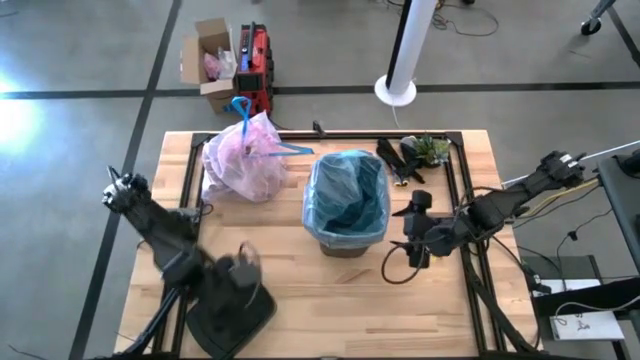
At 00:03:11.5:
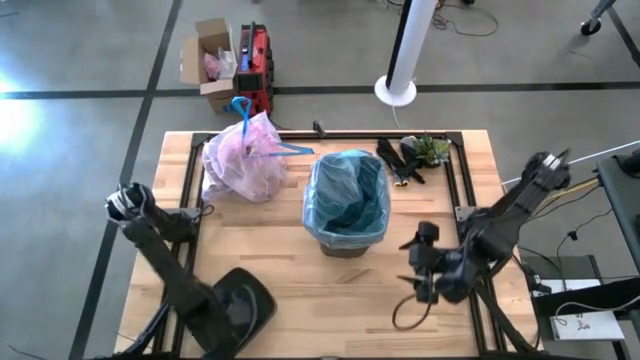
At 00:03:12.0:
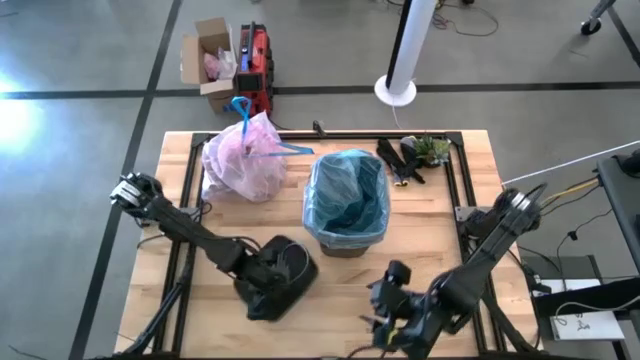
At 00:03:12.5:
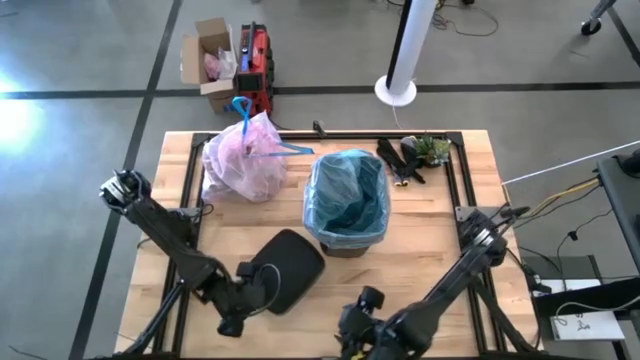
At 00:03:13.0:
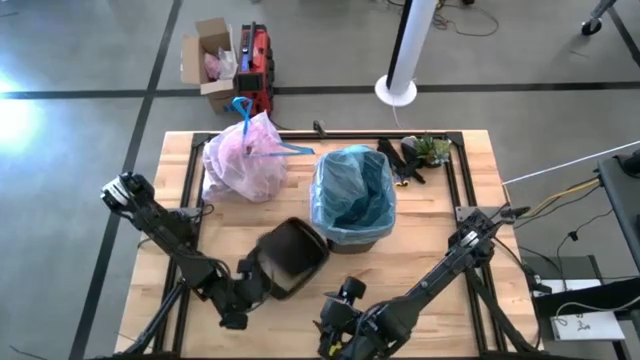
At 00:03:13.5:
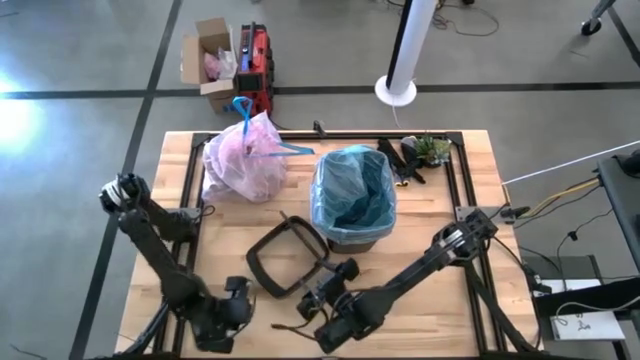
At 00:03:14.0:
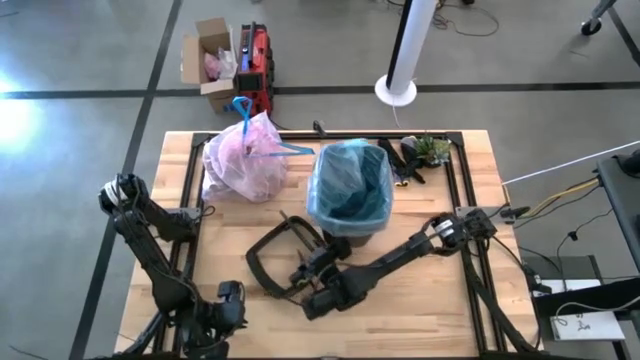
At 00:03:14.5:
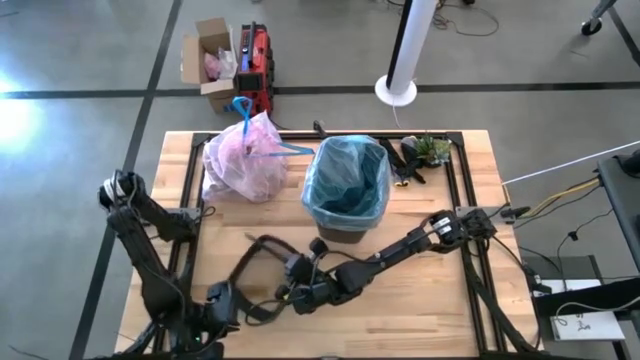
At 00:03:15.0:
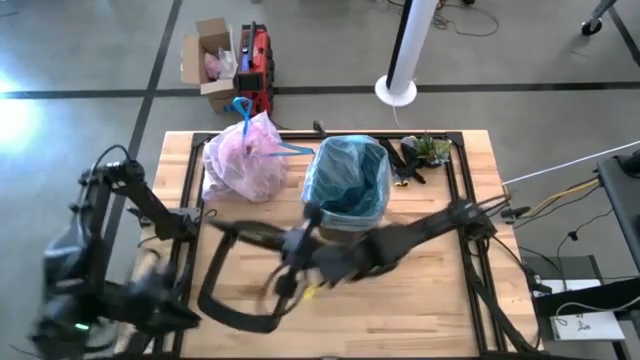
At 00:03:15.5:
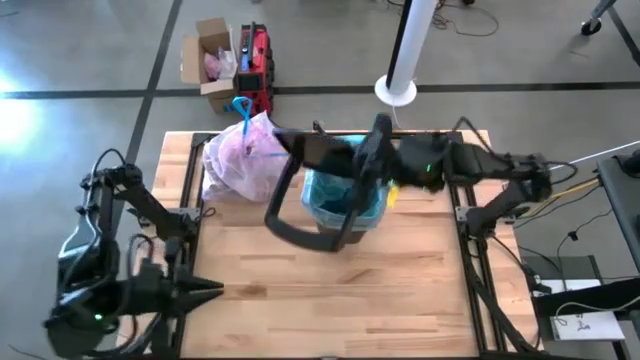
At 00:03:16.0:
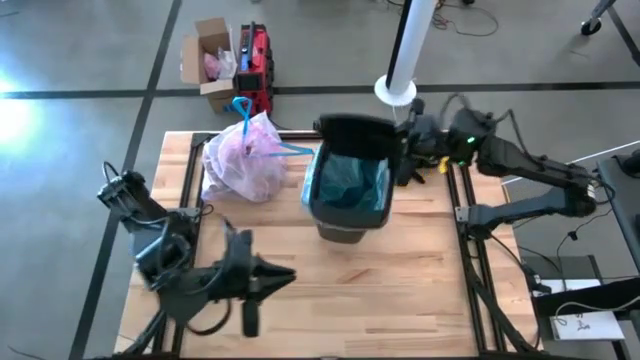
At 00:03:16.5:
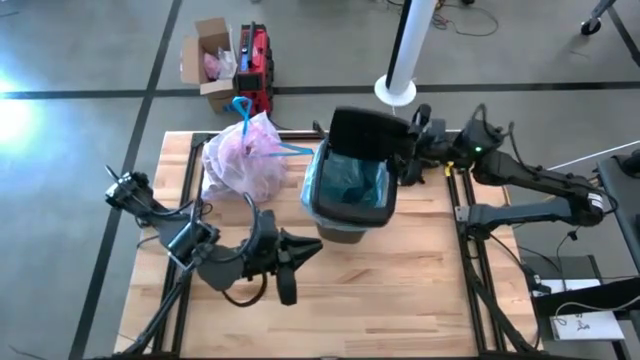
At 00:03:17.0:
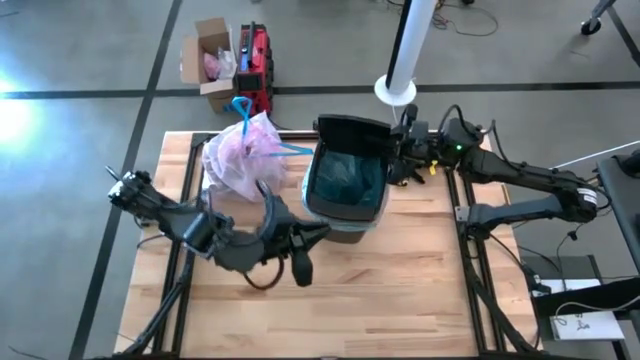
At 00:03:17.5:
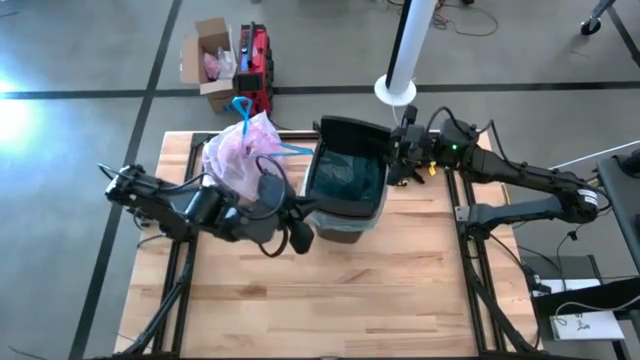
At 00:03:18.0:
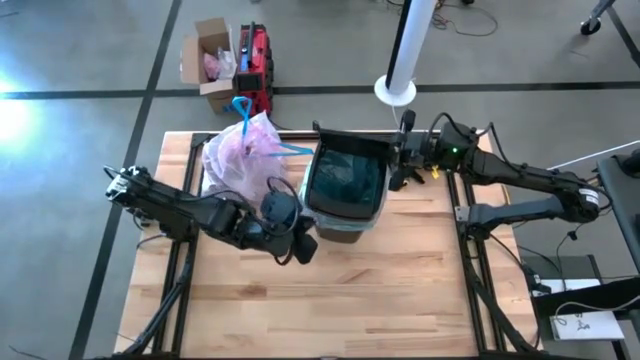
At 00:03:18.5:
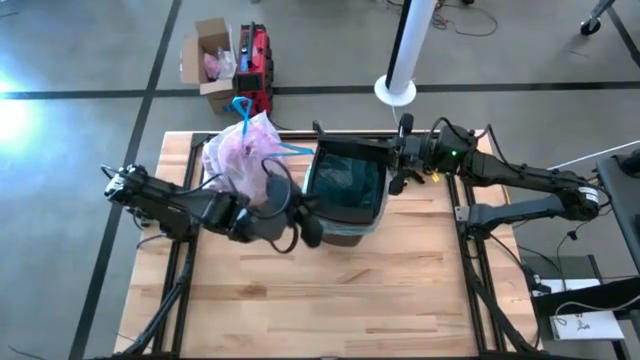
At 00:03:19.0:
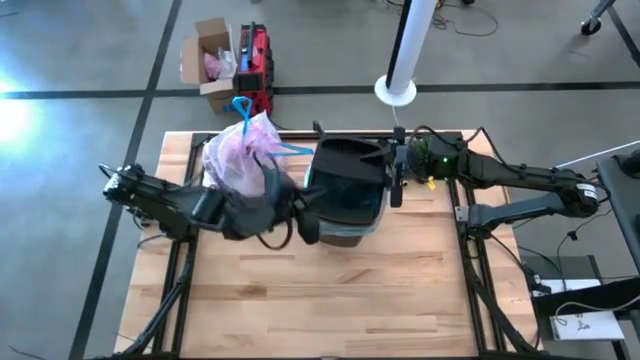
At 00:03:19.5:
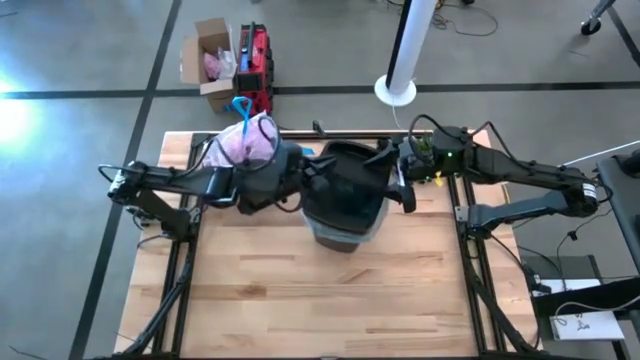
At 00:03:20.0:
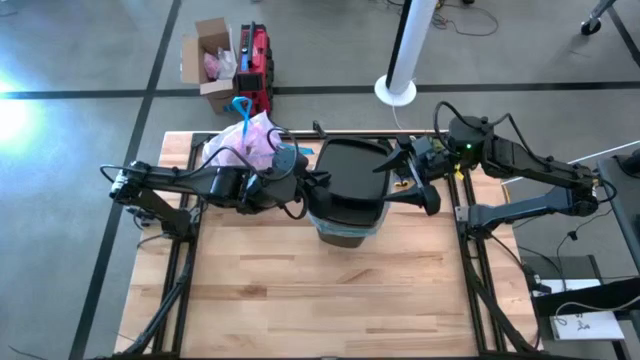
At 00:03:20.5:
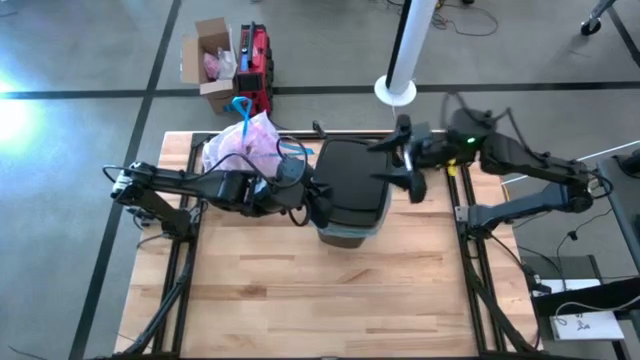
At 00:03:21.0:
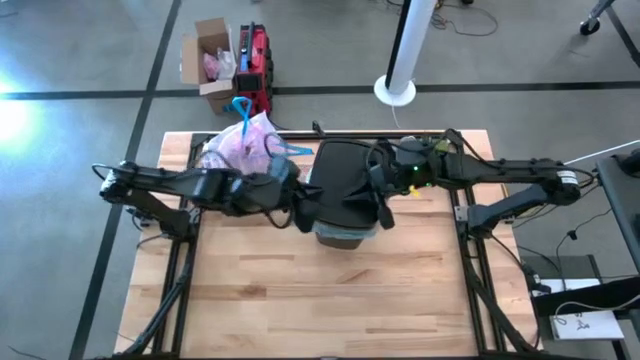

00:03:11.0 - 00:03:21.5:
Task: place trash/remove bag and relplace
Close the trash bin

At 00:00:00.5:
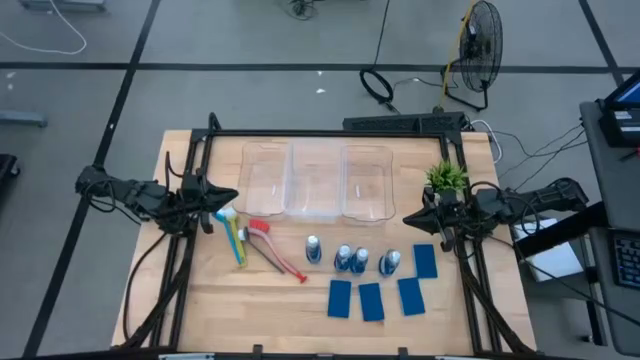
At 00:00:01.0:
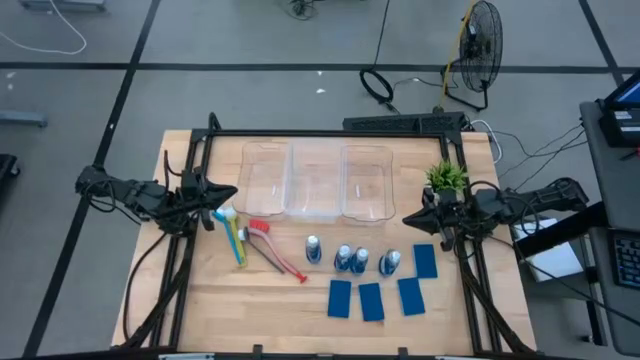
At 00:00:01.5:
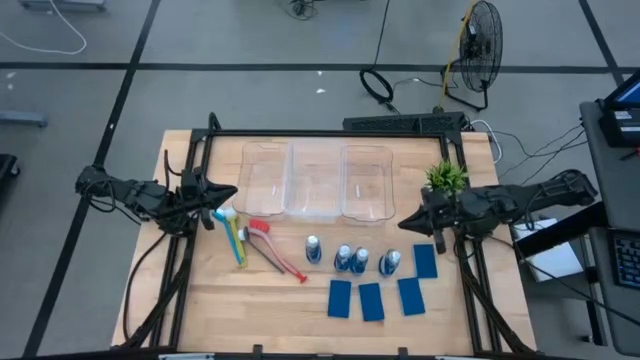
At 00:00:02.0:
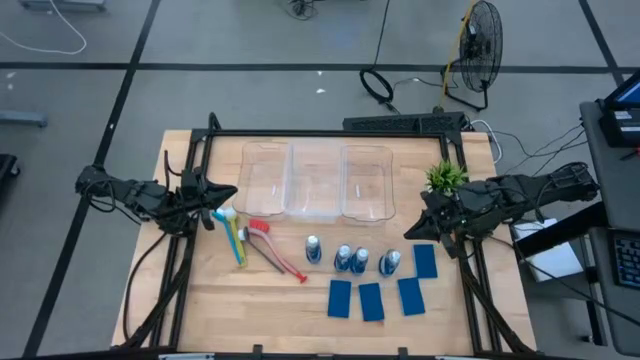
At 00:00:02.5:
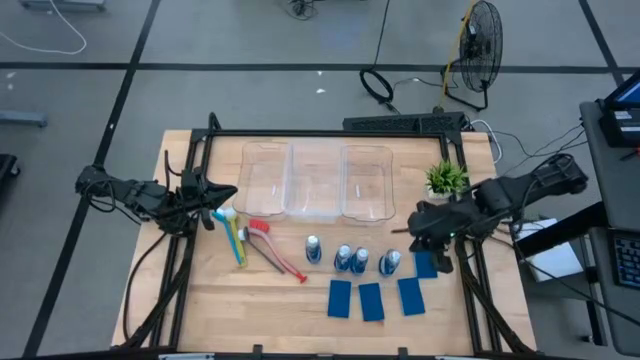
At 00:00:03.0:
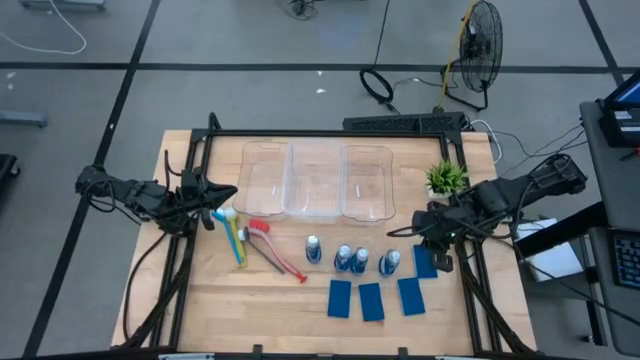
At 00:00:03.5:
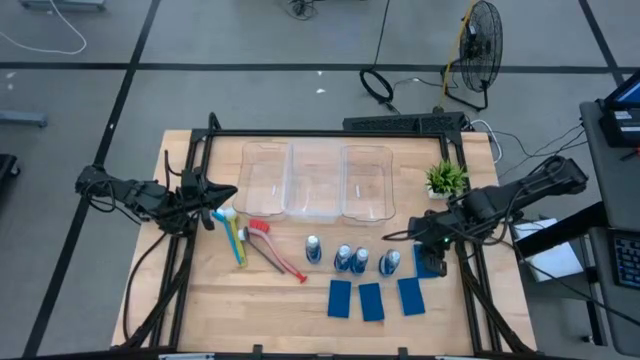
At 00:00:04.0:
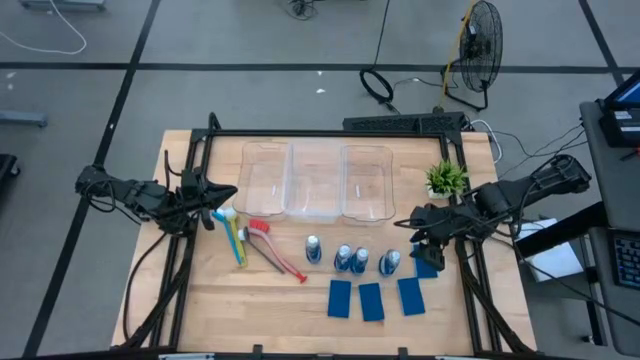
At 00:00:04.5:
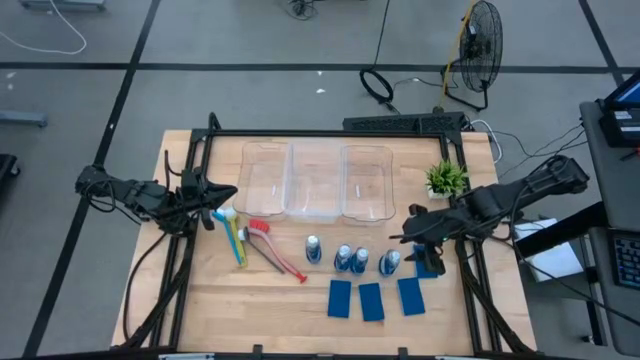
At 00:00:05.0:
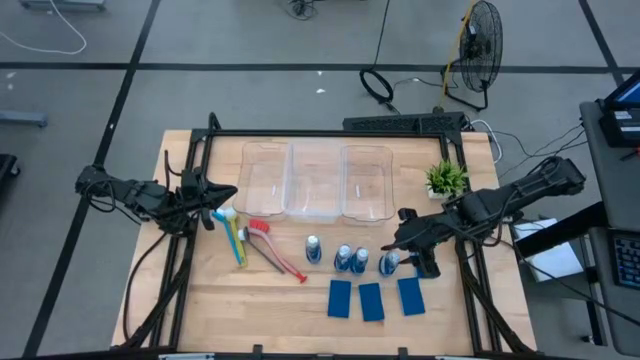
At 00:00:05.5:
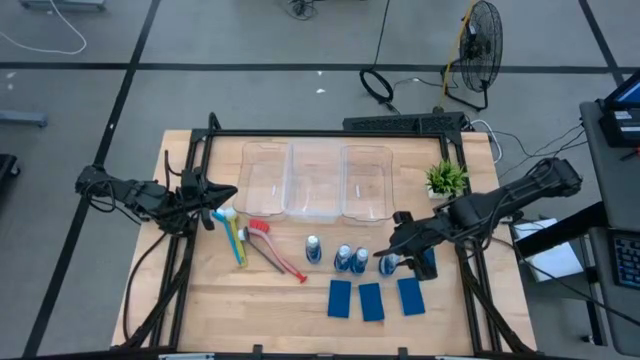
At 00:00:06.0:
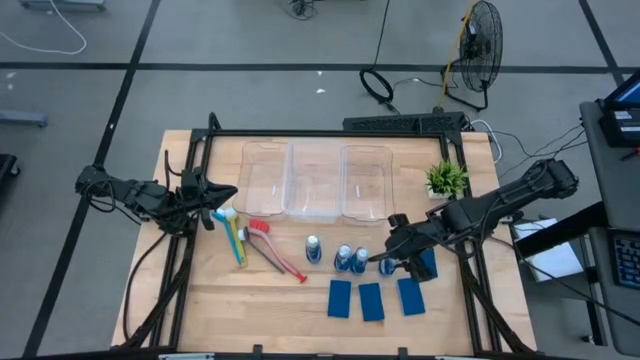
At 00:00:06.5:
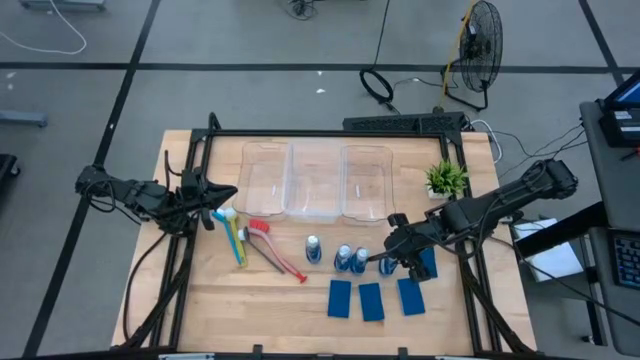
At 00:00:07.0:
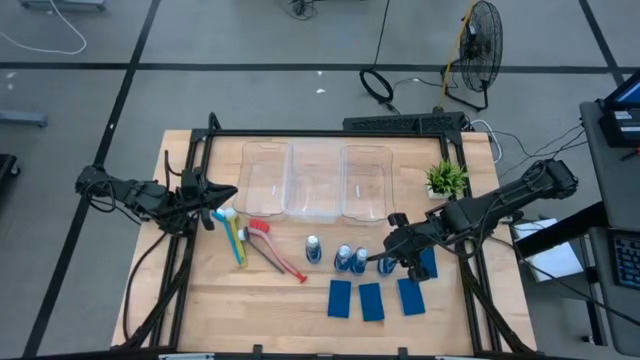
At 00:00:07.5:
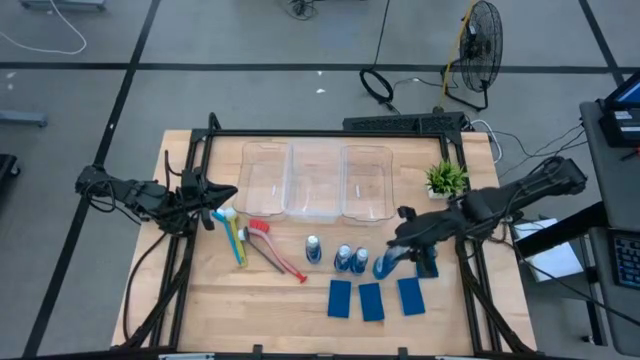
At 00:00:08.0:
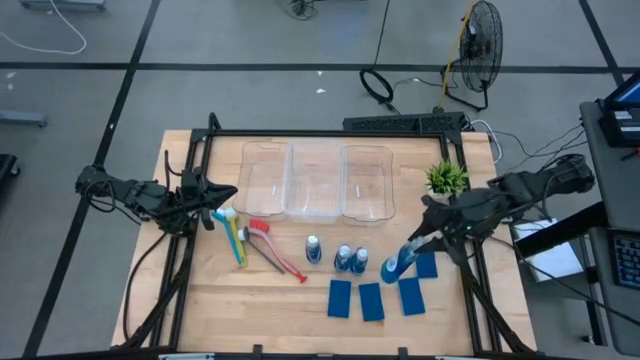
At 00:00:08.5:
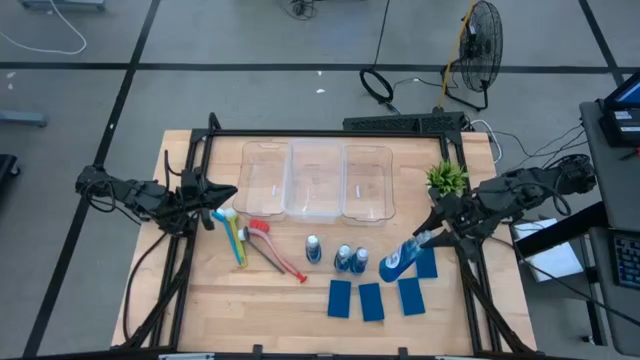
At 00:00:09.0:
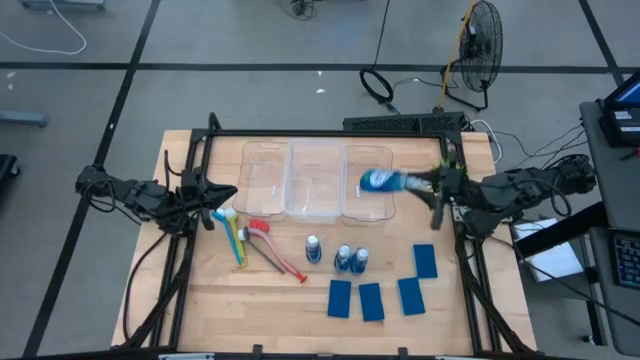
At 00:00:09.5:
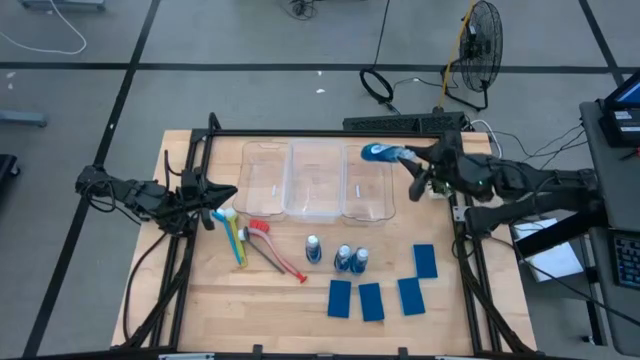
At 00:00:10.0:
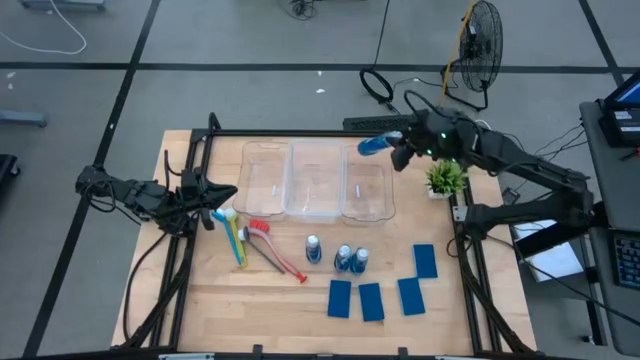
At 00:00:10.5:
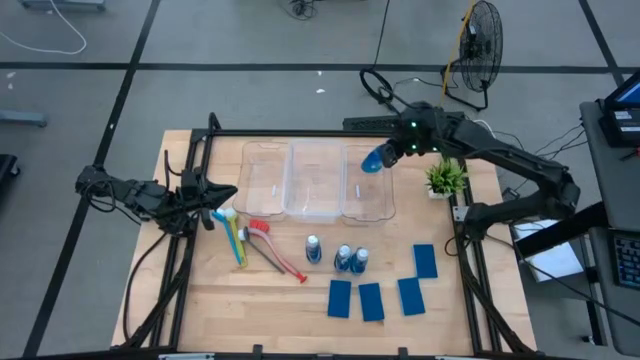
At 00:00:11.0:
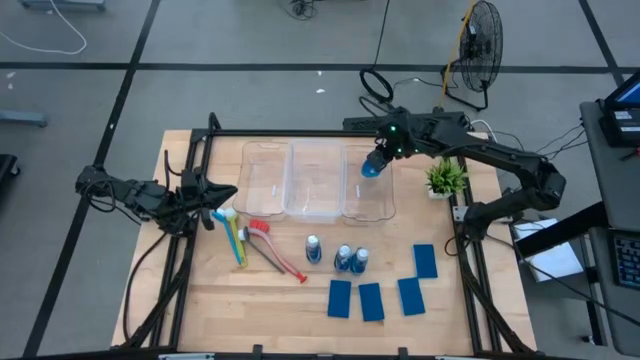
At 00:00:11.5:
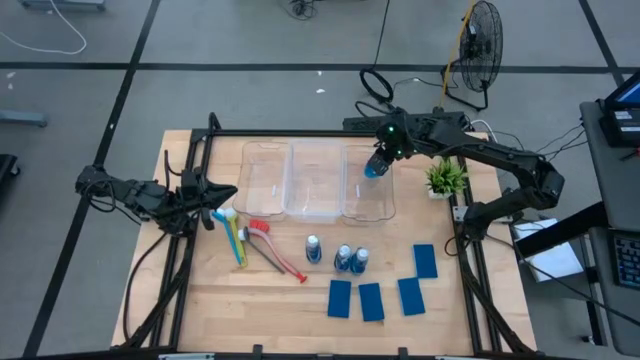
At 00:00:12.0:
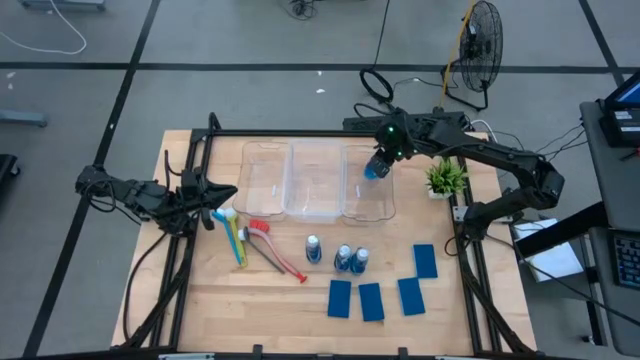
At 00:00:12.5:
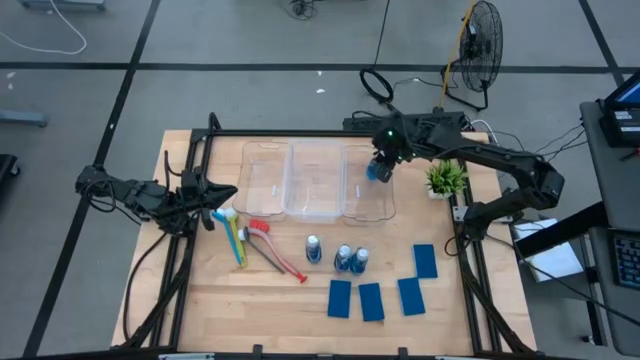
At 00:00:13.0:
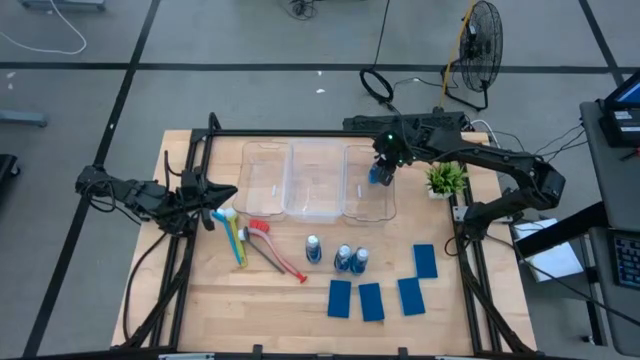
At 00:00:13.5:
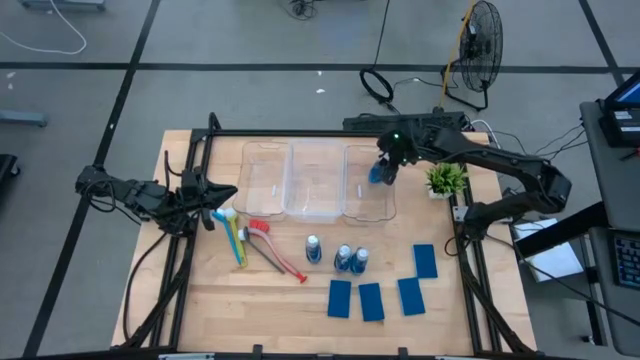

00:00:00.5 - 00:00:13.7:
Task: Pick & Place Kitchen Sink Supplies
Put the blue dishwashing liquid bottle into the right transparent bin
